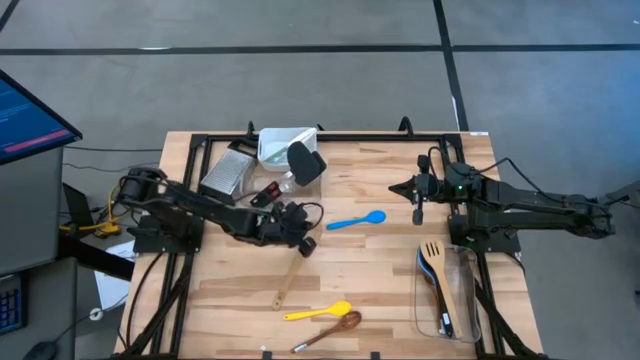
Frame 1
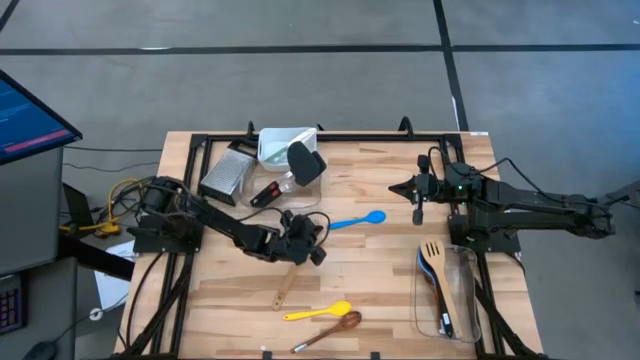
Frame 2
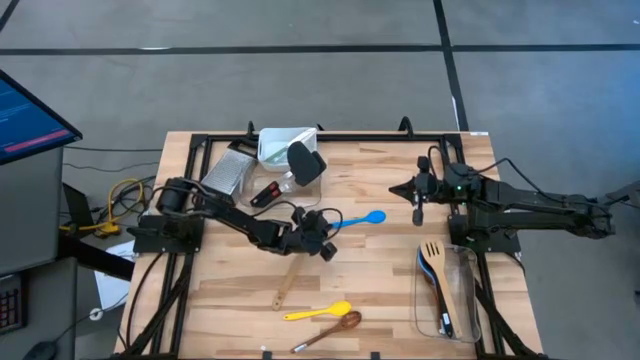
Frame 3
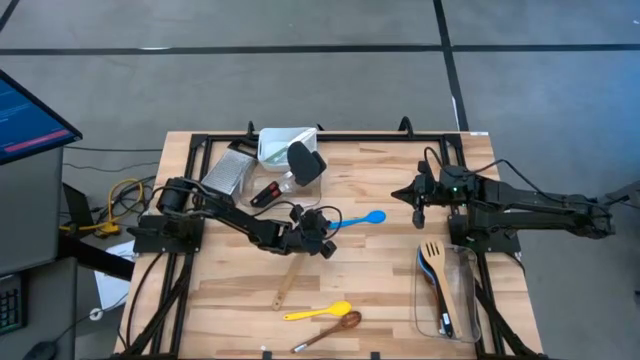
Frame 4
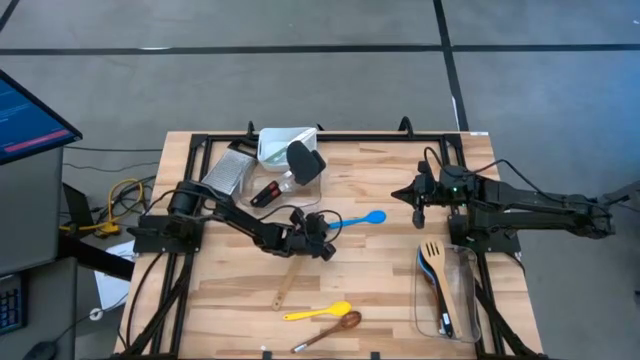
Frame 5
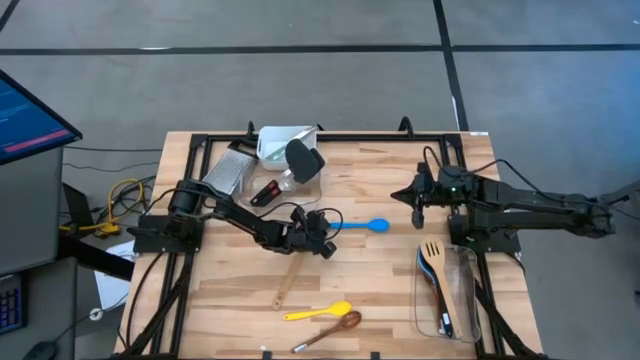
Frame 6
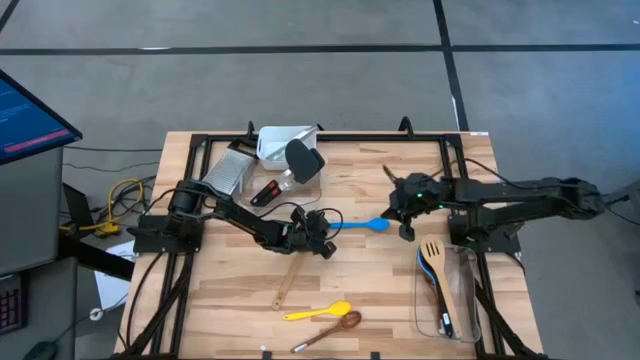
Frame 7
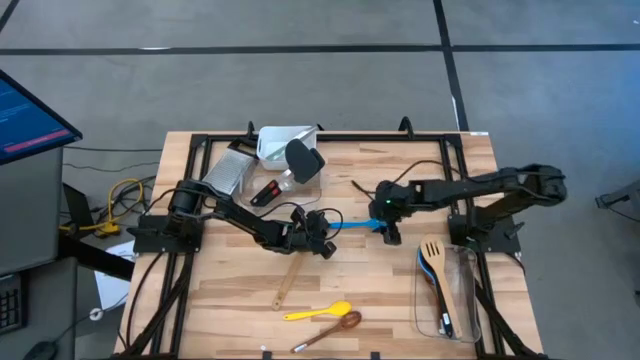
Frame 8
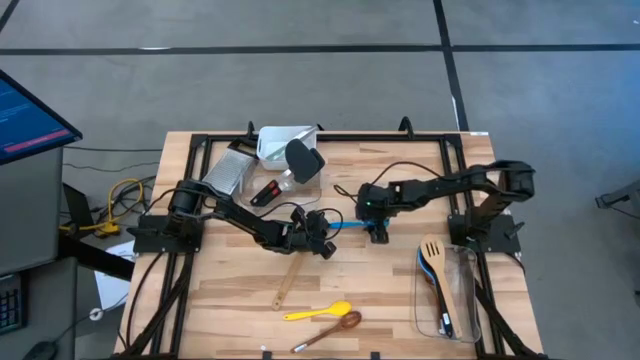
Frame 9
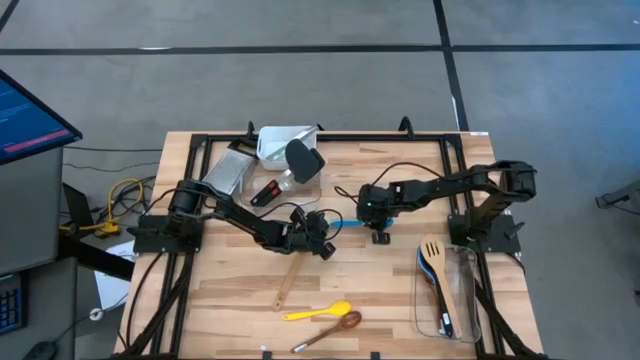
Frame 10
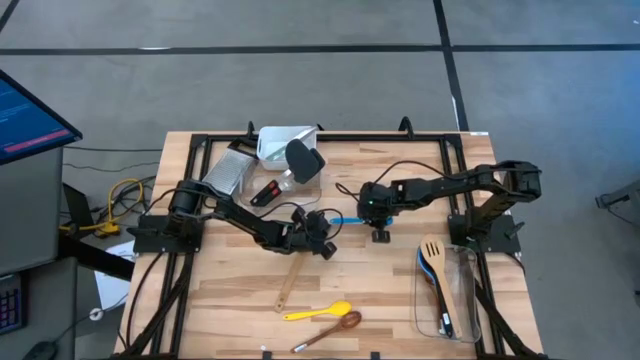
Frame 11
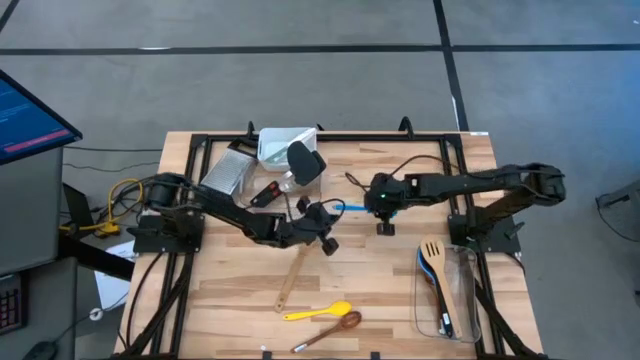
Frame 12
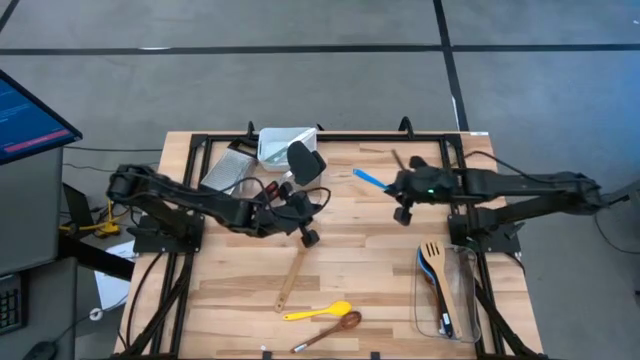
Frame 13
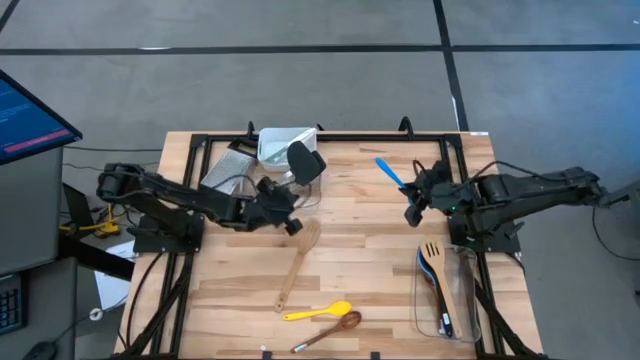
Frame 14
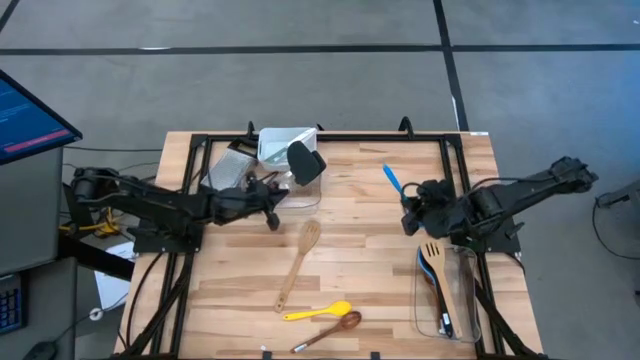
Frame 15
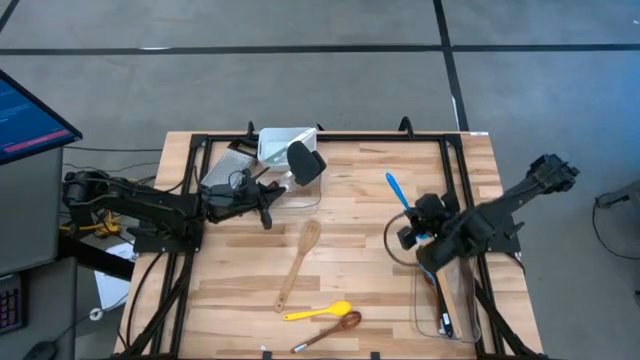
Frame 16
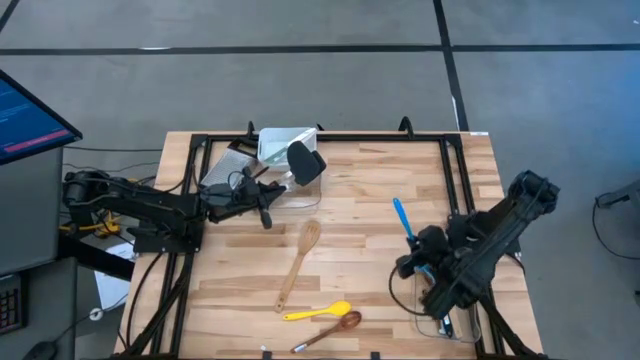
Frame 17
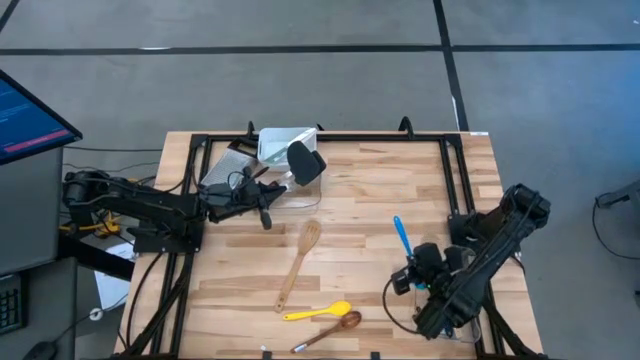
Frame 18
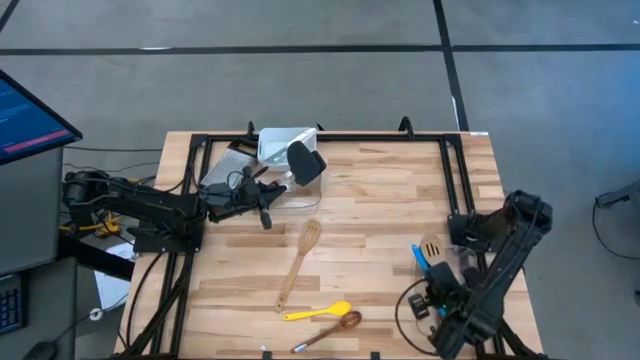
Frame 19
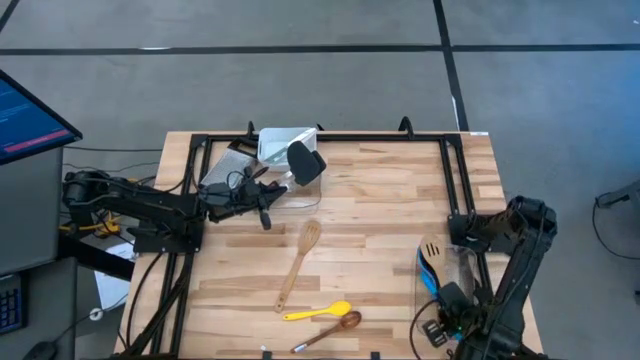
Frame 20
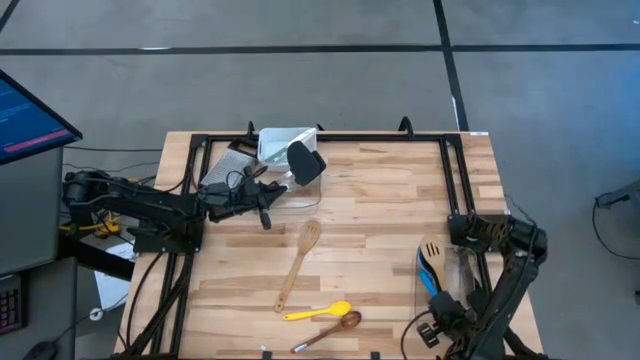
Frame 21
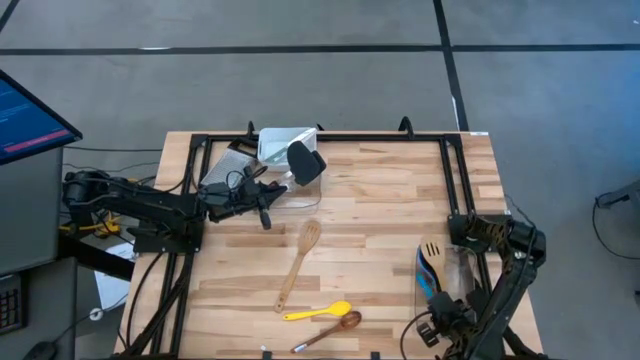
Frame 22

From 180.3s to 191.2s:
Task: Pick & Place Kitchen Items
Put the blue spoon into the bottom transparent bin

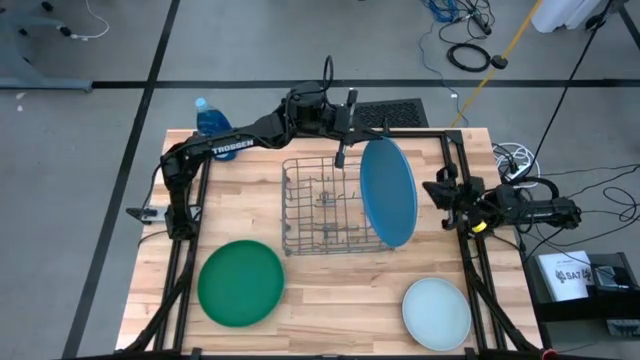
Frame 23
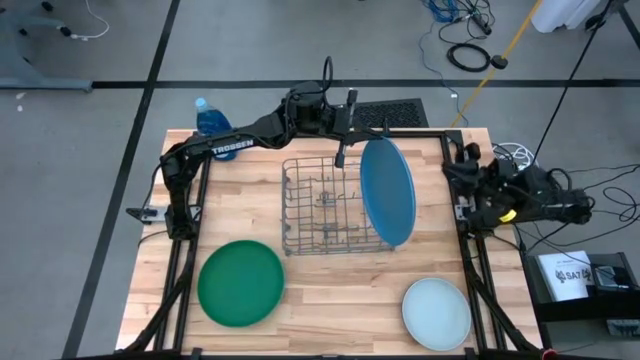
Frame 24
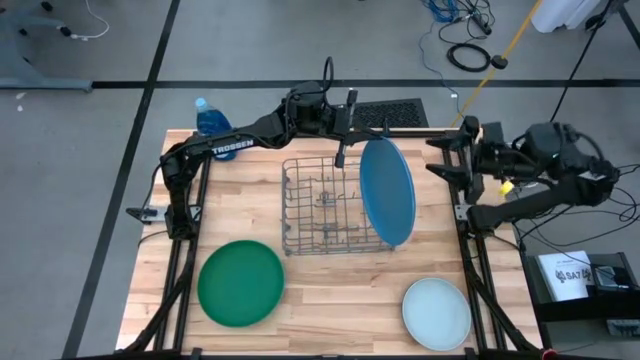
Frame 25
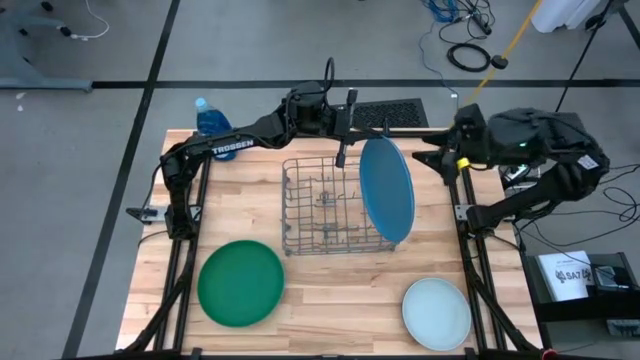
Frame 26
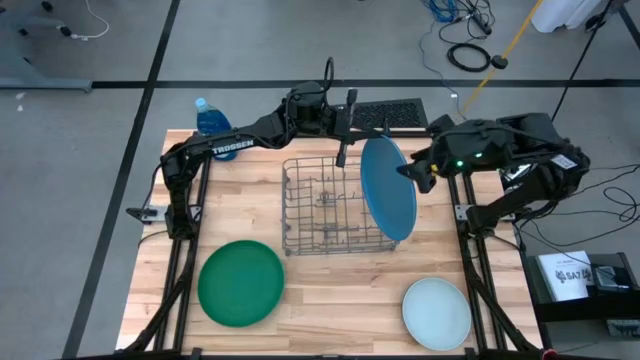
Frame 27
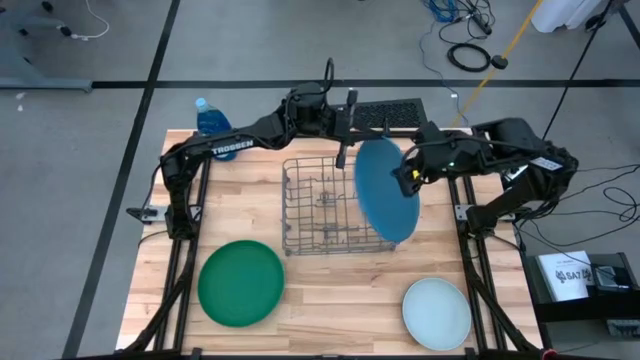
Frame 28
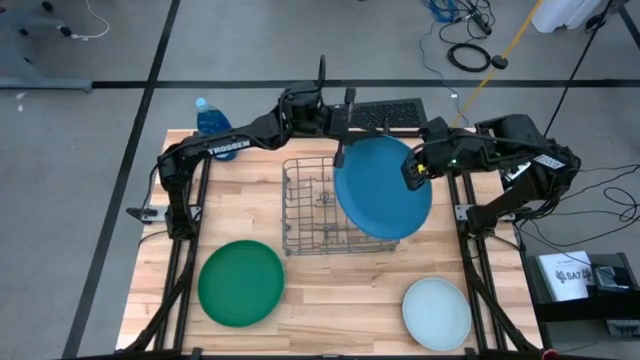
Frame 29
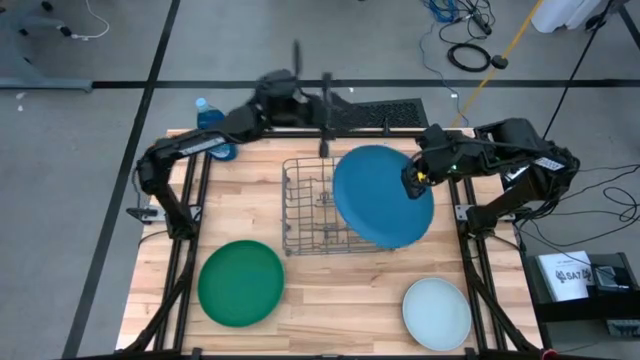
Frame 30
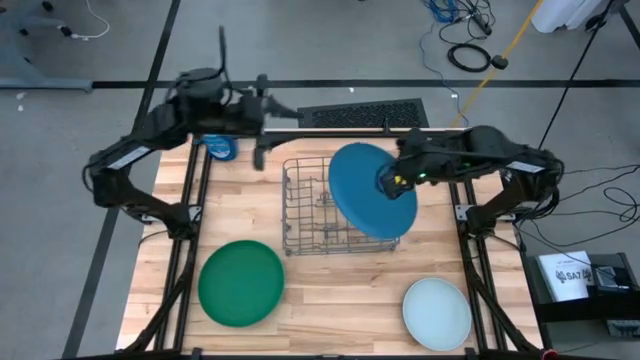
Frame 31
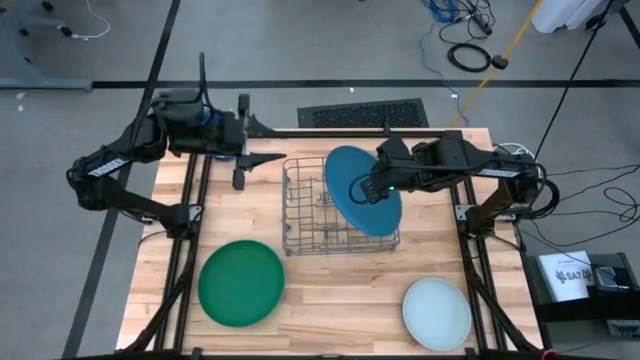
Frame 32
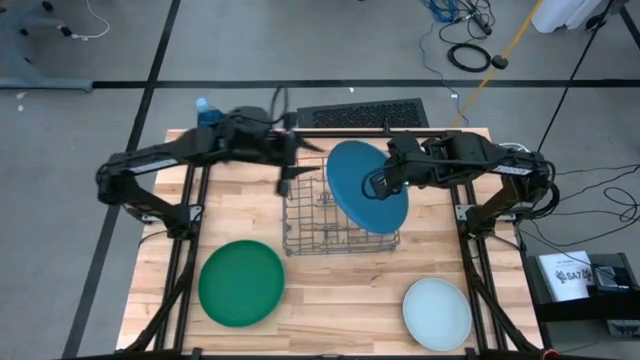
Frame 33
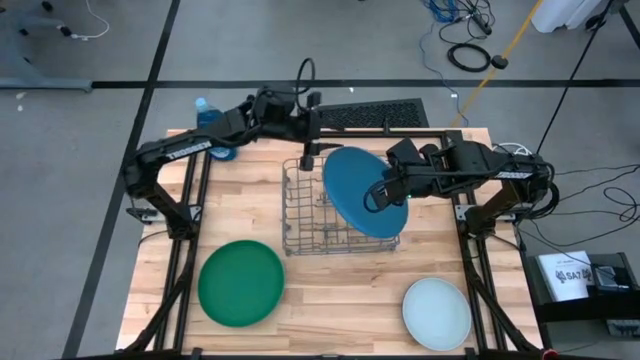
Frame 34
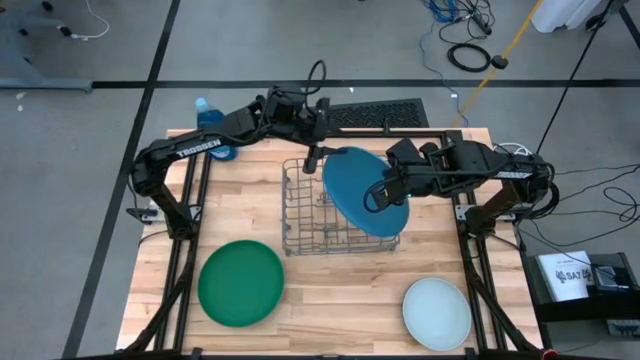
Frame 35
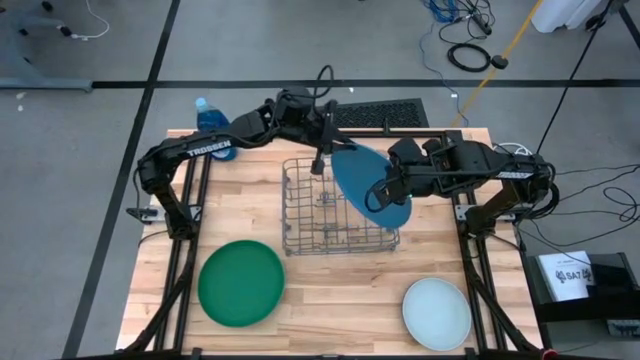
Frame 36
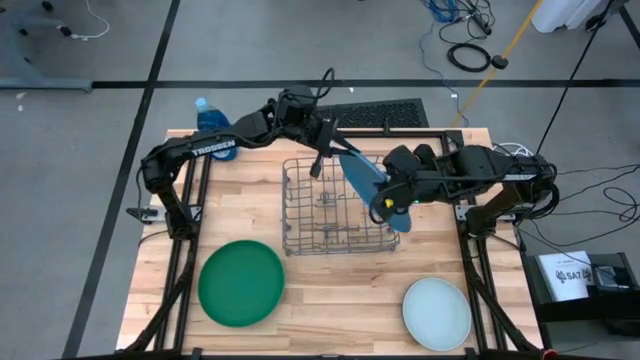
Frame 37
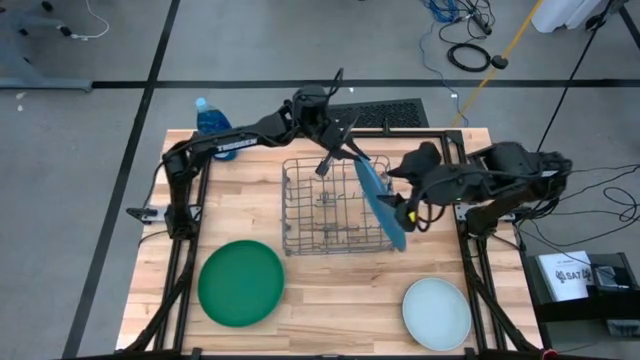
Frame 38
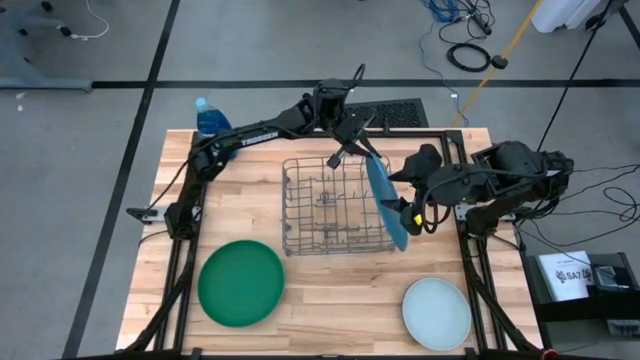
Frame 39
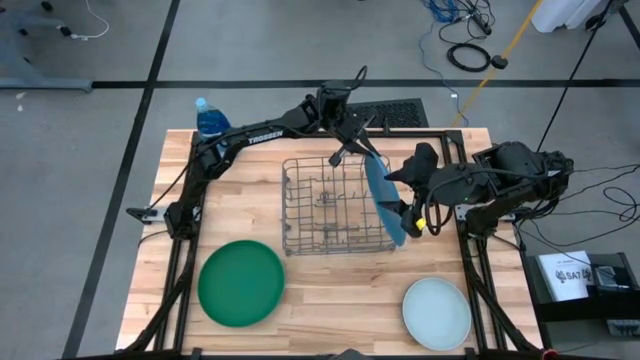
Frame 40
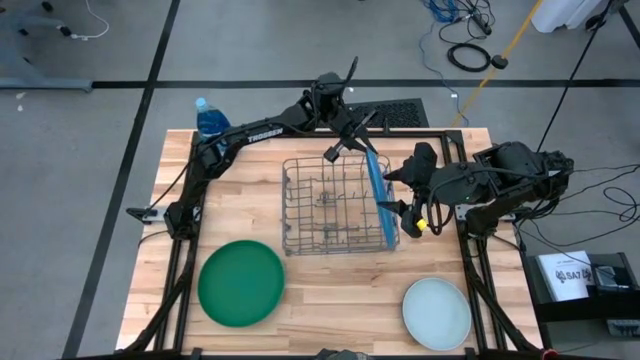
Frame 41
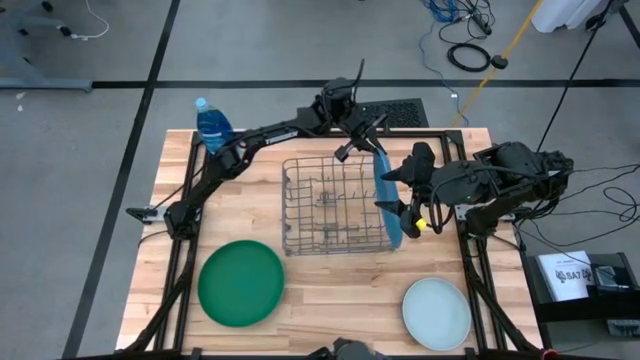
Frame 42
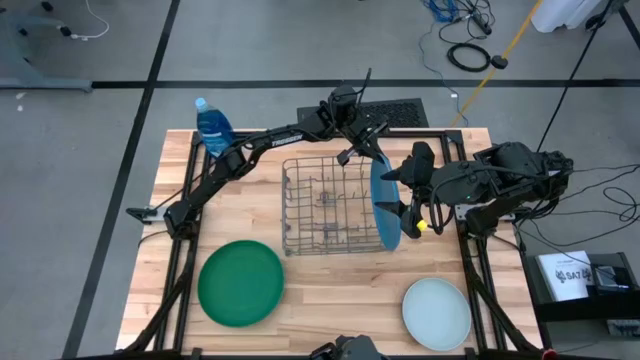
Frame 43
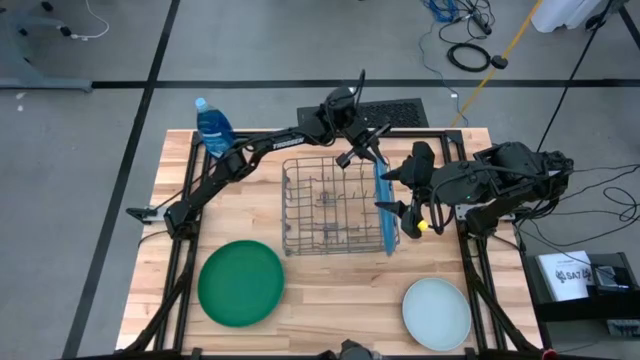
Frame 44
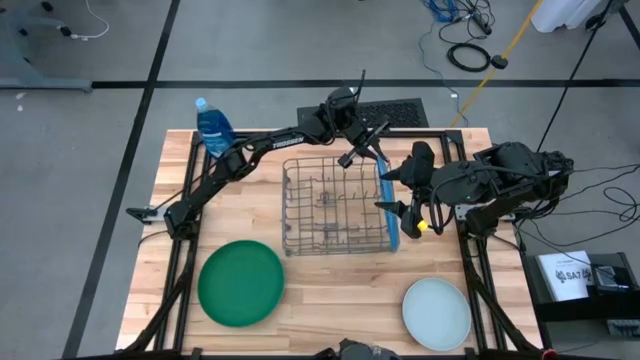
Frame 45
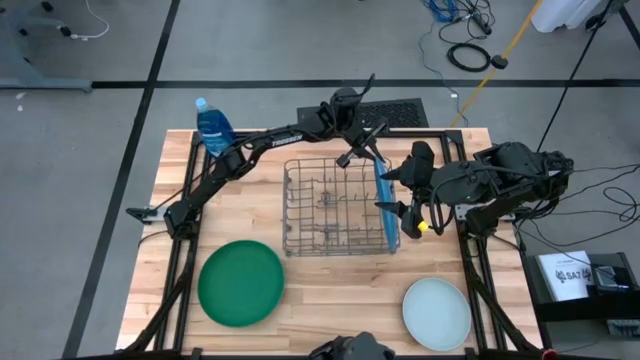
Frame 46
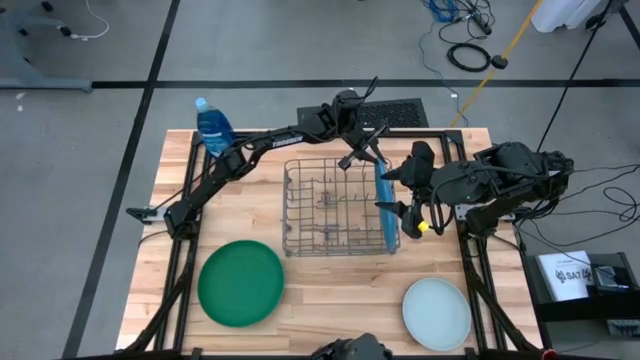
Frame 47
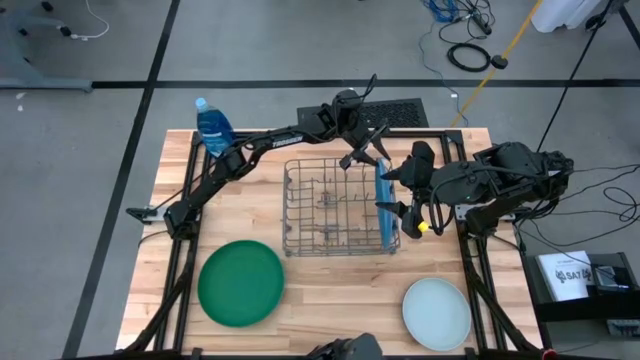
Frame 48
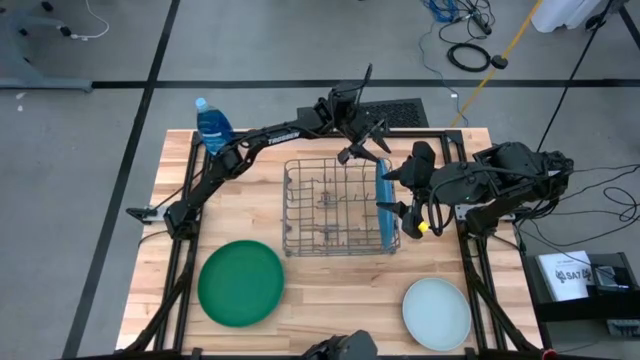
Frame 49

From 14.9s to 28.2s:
Task: Sort dishes
Put the blue plate into the dish rack
